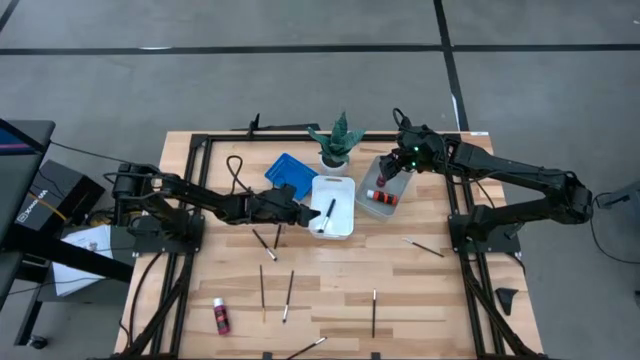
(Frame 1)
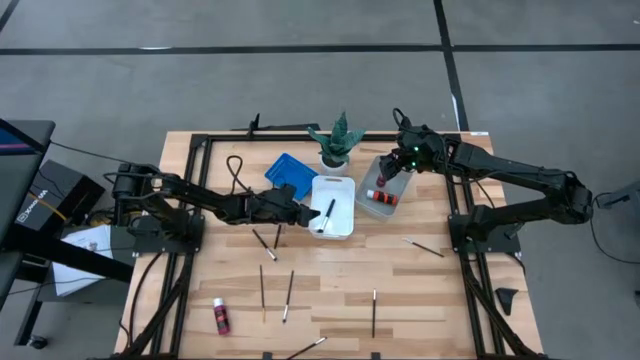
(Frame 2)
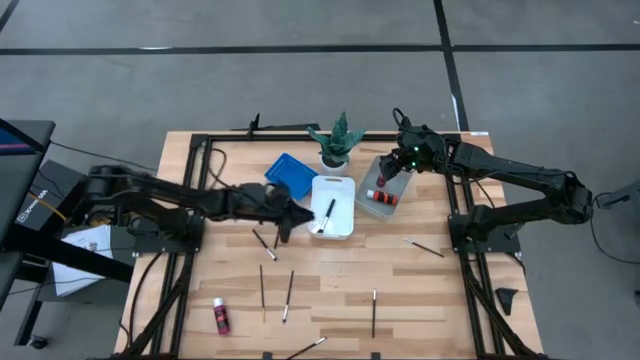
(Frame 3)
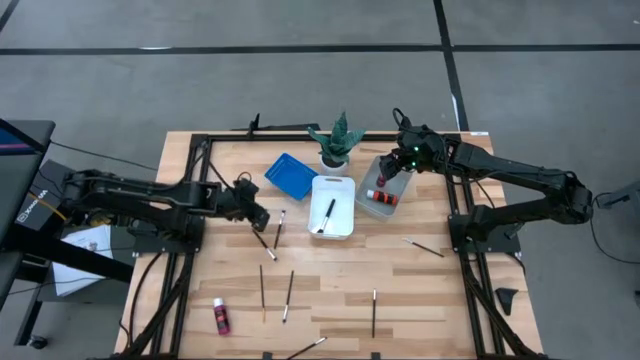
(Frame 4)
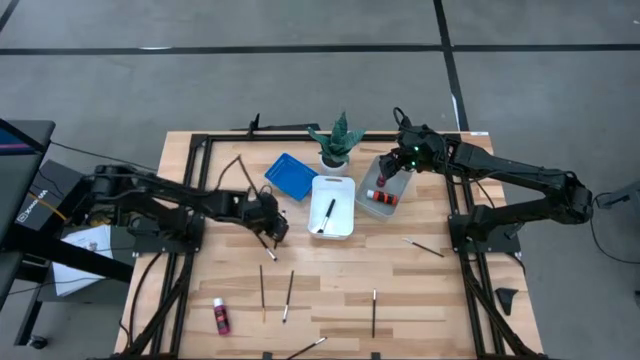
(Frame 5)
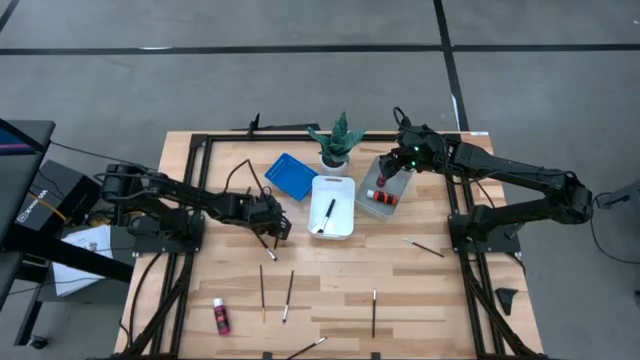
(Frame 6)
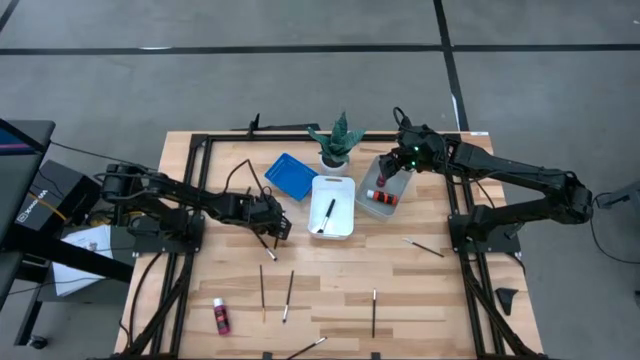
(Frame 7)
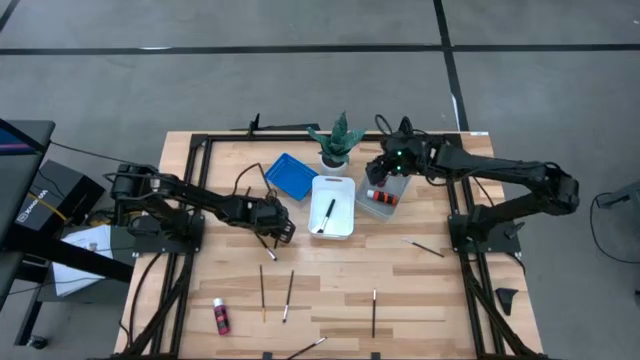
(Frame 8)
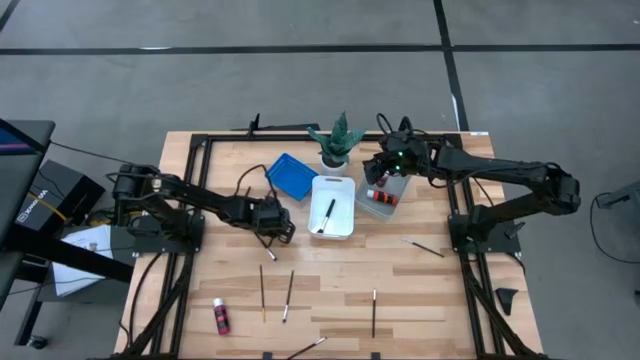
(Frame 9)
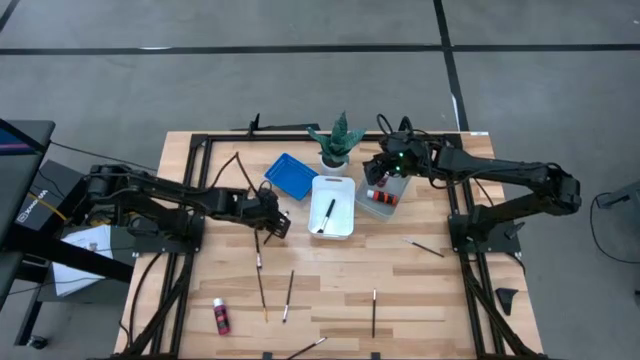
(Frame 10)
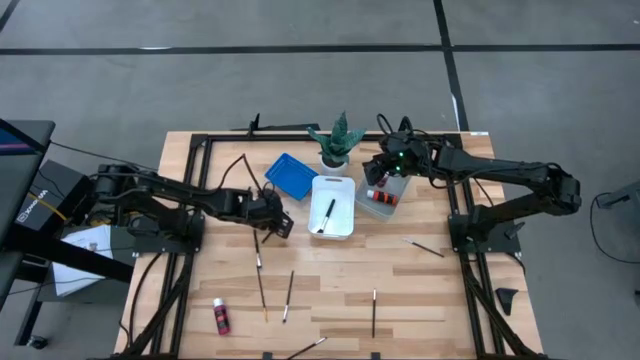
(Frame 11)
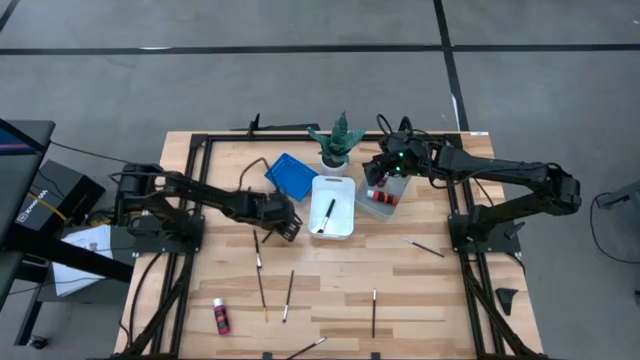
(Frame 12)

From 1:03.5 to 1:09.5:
Task: Pick & Place Paint Supplies
Put the large black paint brush into the white bin

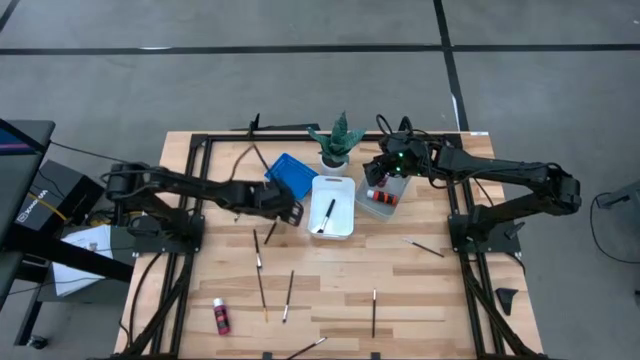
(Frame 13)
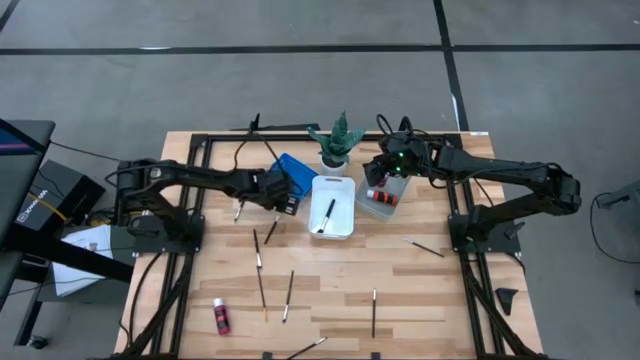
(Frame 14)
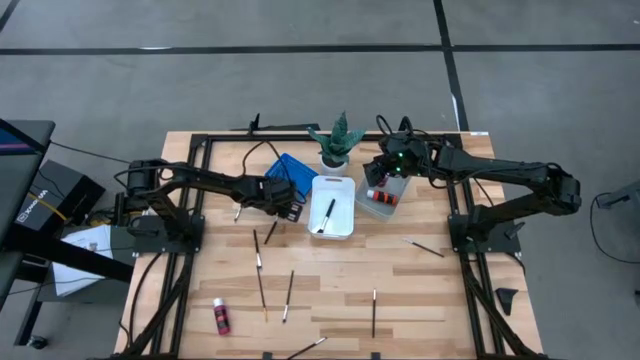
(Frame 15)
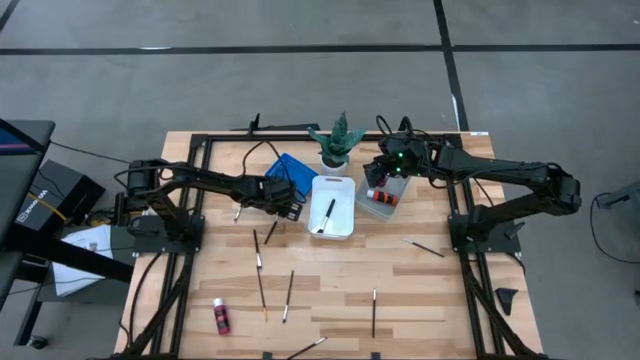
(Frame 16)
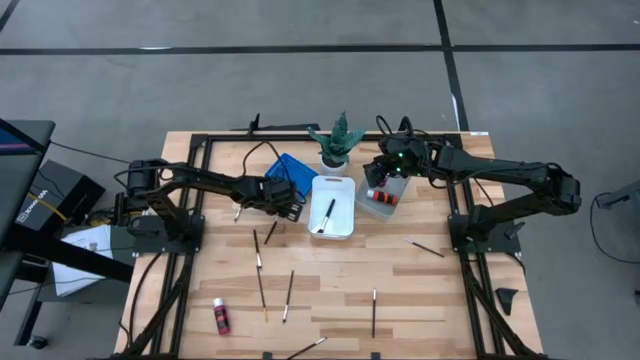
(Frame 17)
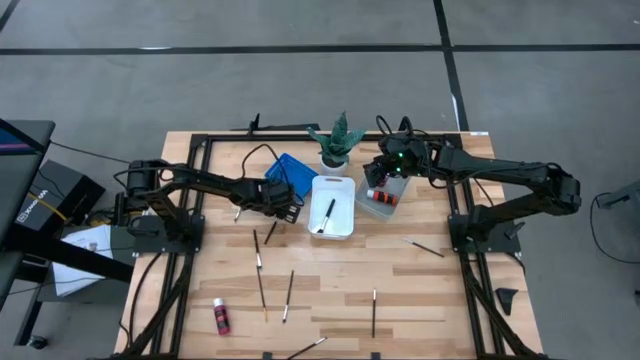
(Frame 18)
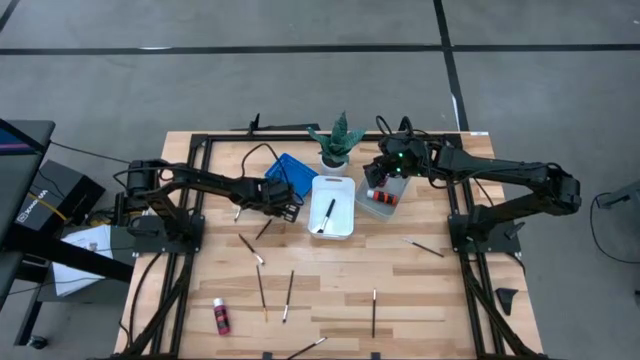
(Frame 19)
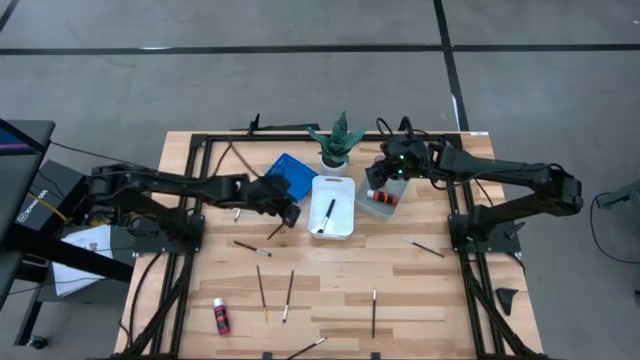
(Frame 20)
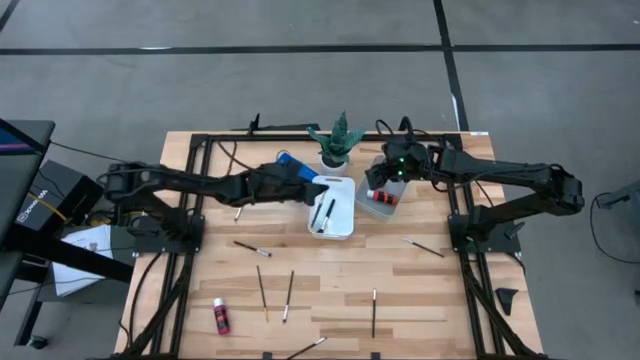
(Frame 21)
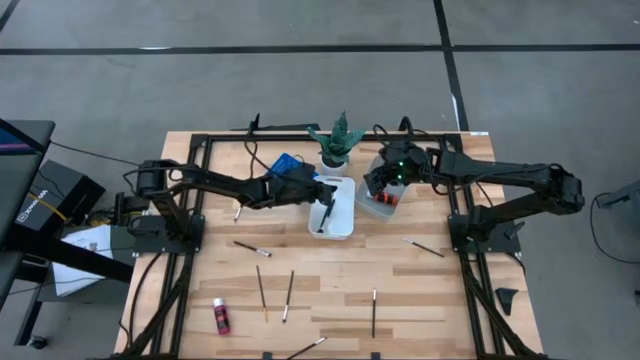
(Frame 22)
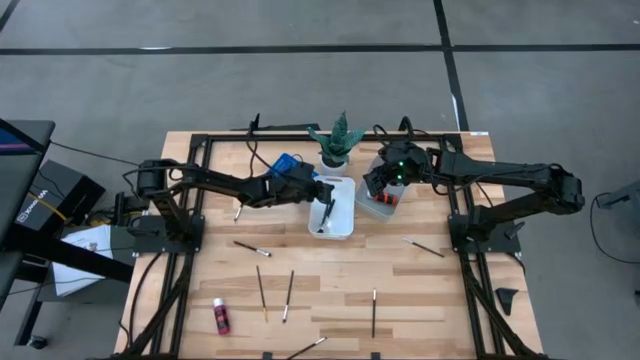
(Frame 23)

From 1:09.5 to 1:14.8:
Put the large black paint brush into the white bin

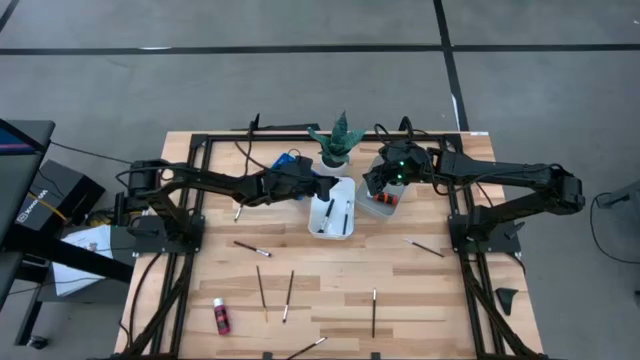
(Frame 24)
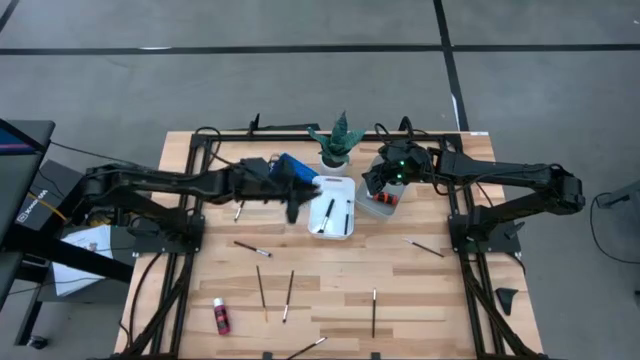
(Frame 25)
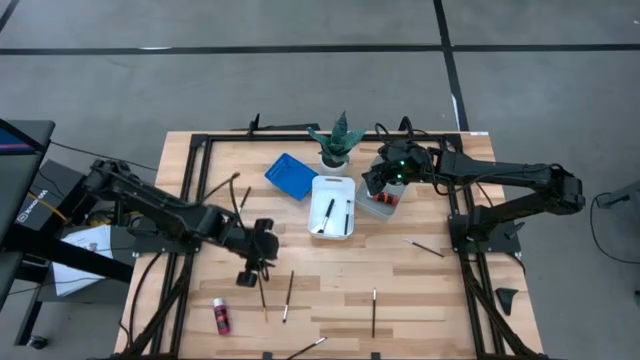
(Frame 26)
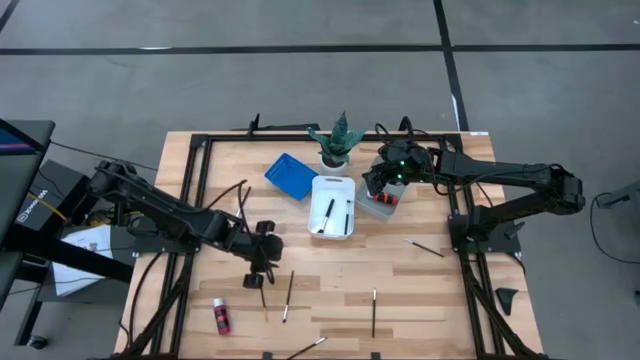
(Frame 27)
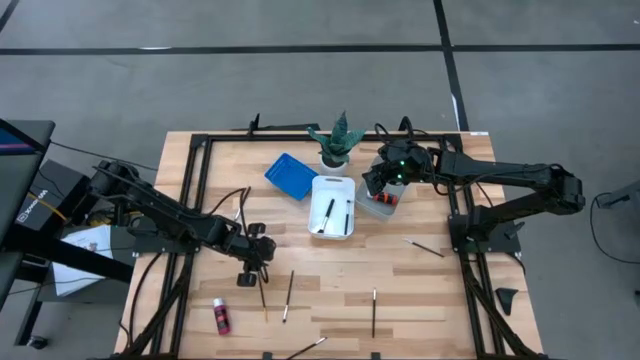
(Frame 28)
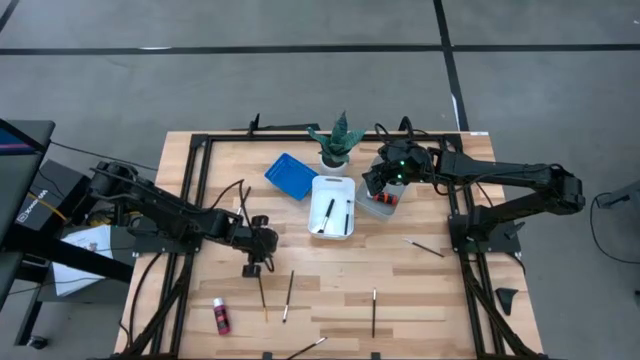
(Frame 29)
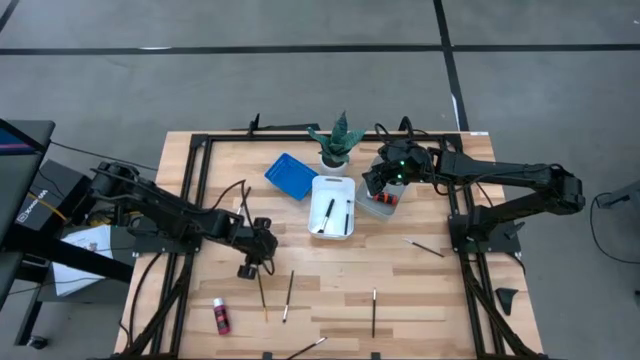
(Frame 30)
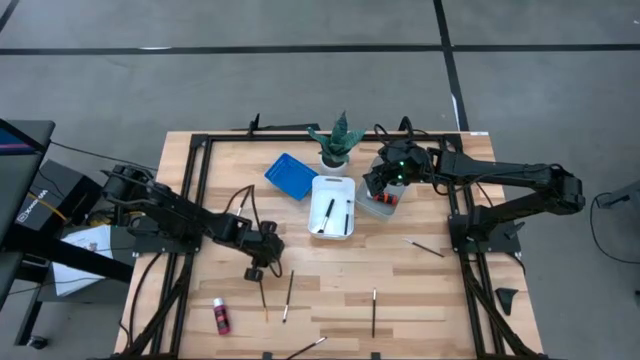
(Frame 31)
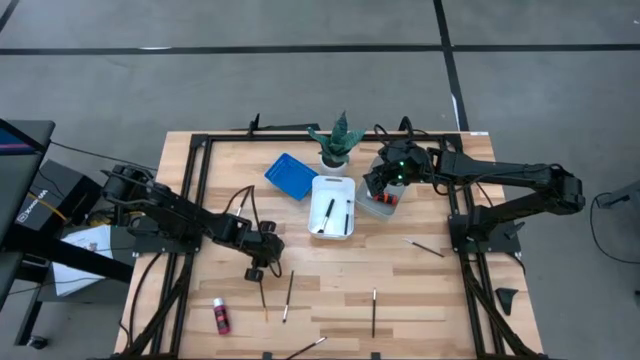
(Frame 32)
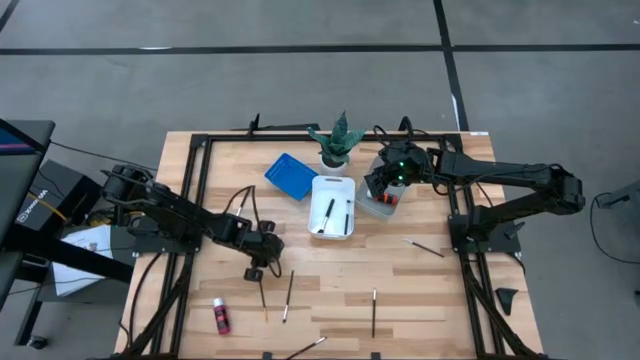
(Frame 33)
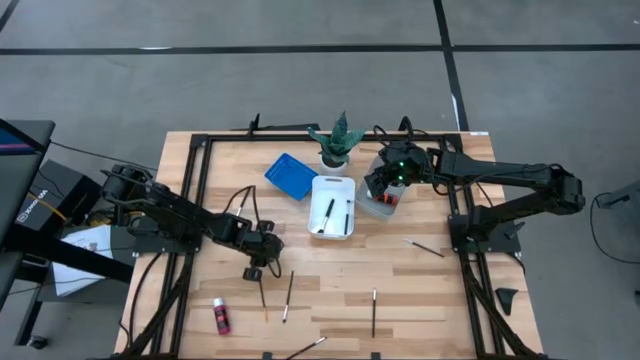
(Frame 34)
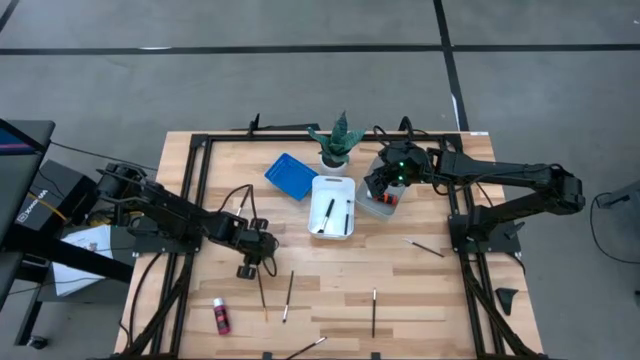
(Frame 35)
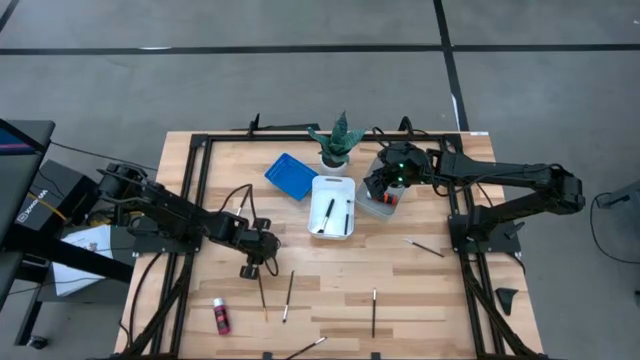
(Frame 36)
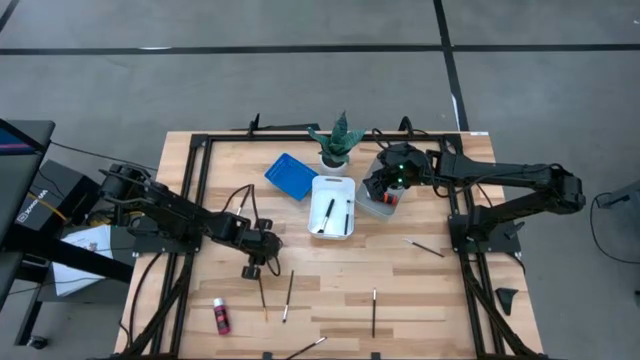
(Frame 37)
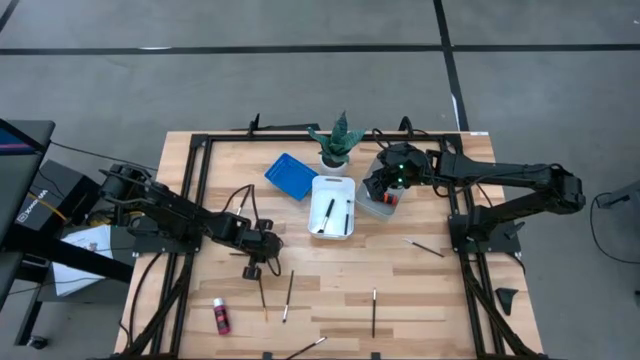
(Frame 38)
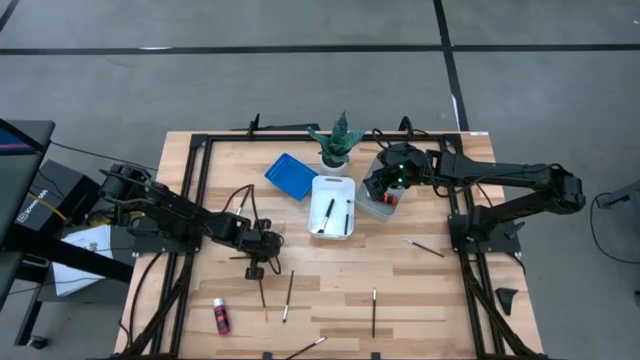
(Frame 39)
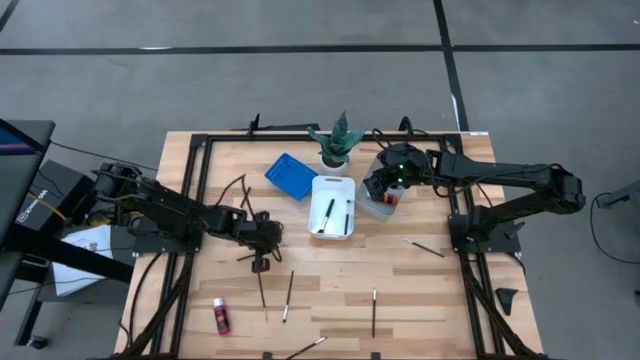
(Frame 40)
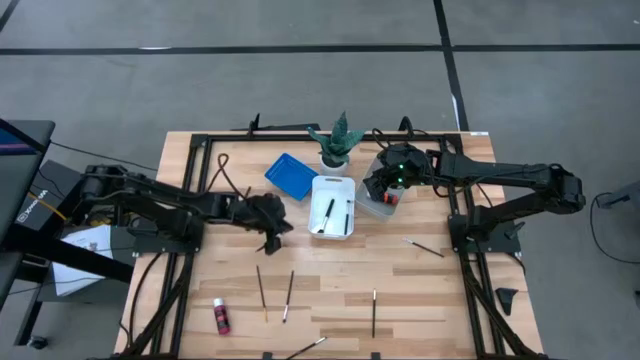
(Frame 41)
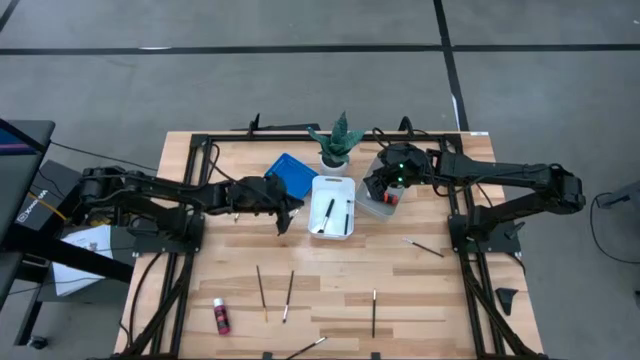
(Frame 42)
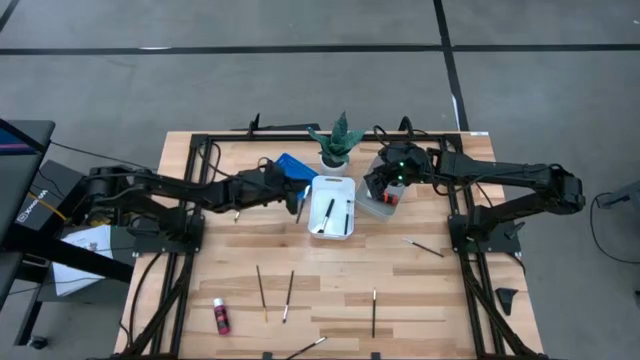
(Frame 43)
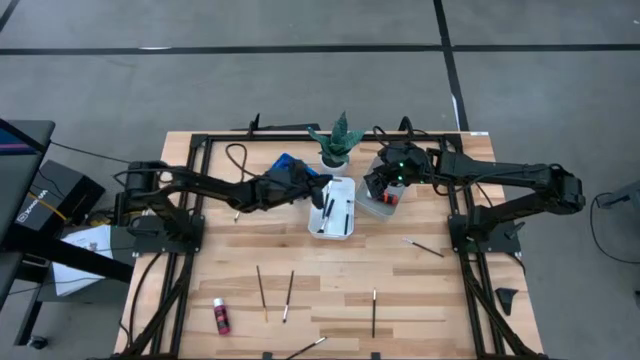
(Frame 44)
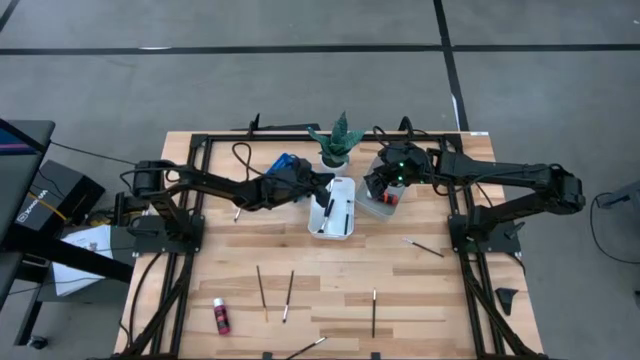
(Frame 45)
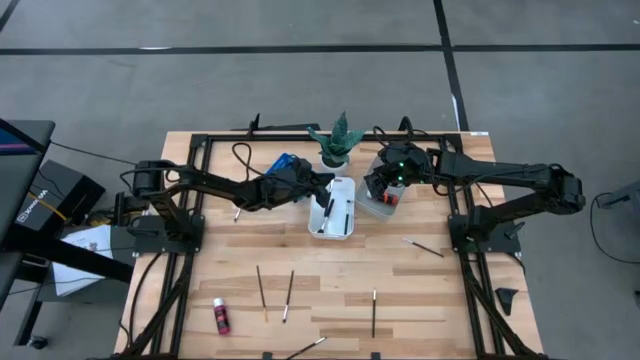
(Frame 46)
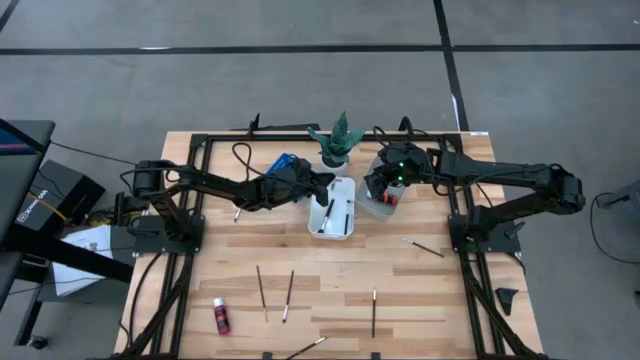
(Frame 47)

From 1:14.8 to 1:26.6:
Put the large black paint brush into the white bin
